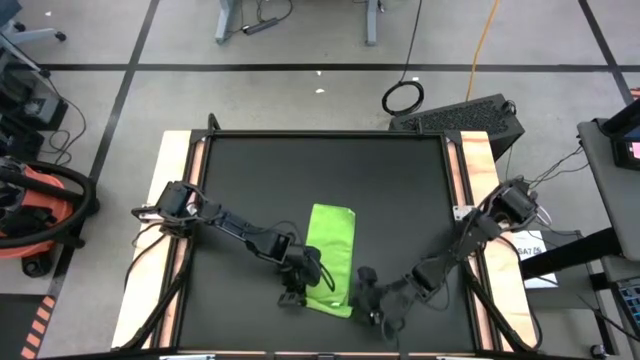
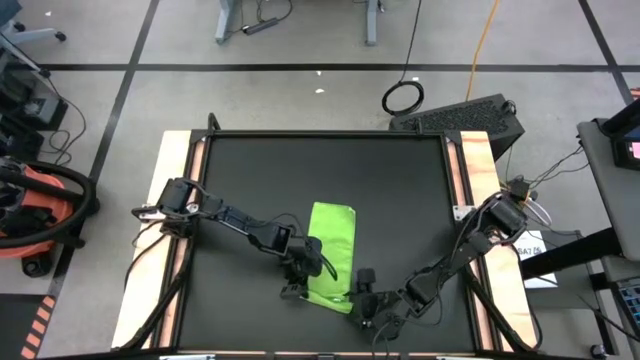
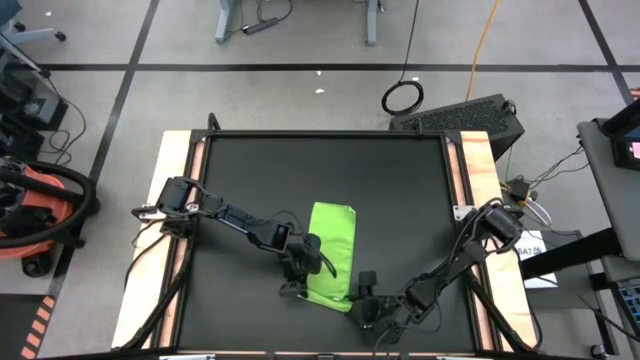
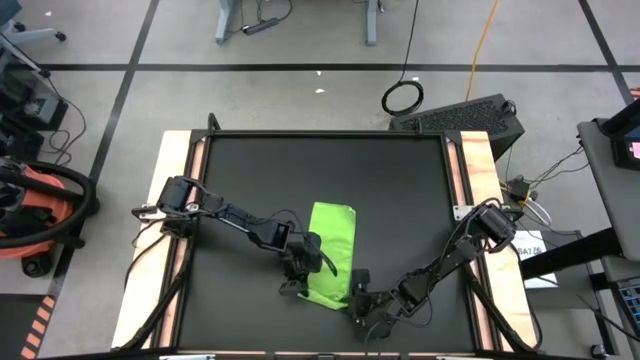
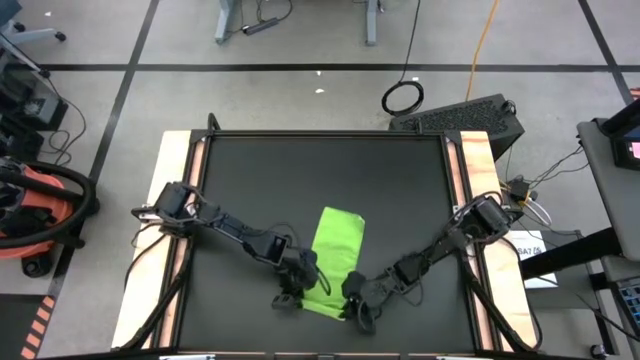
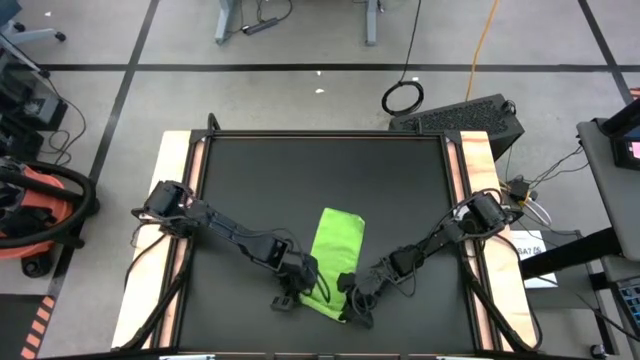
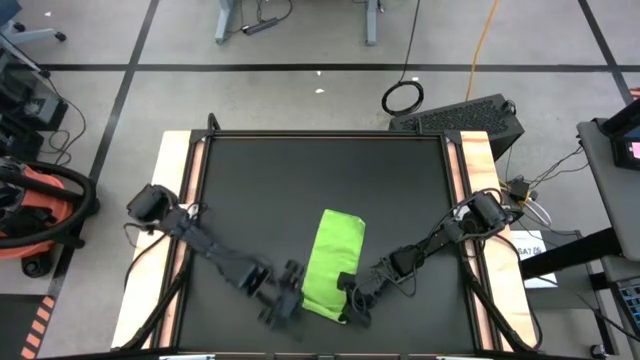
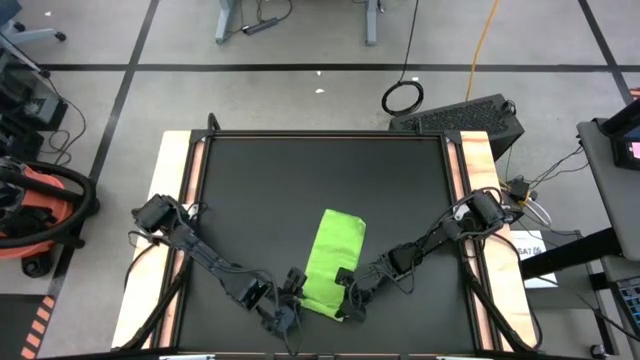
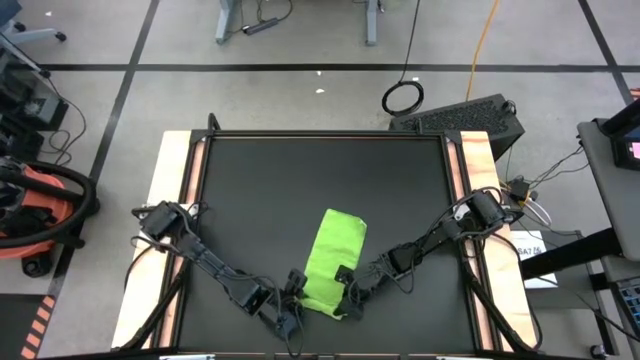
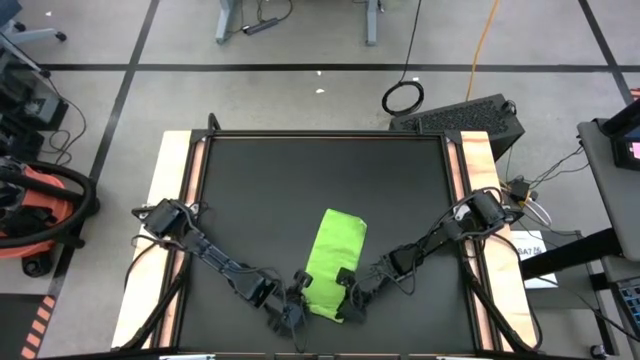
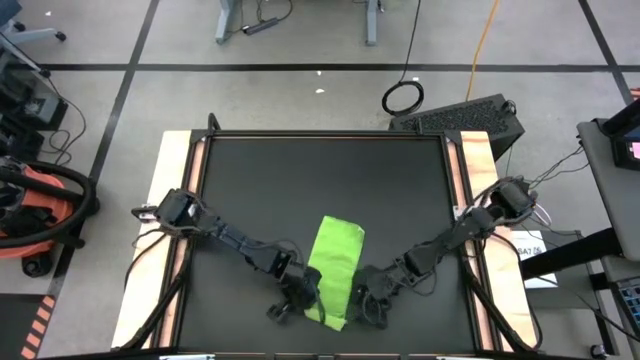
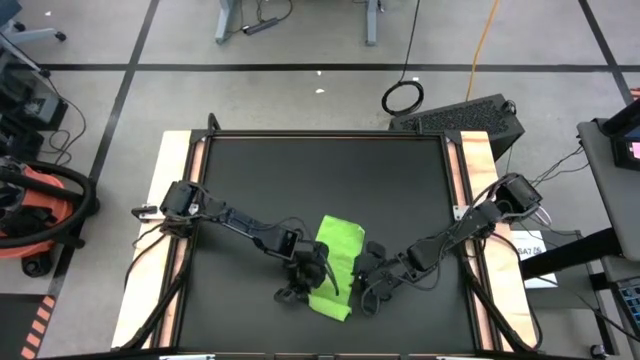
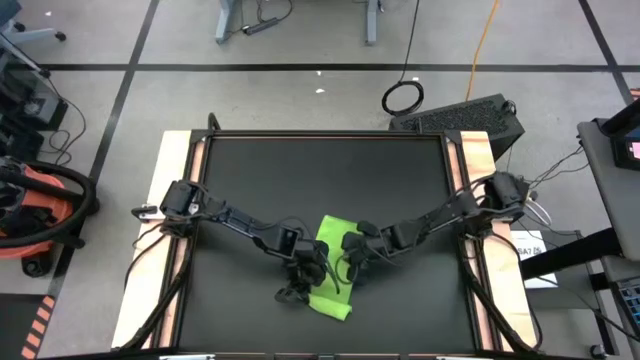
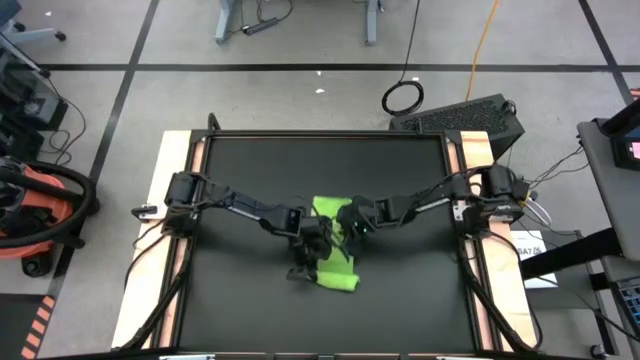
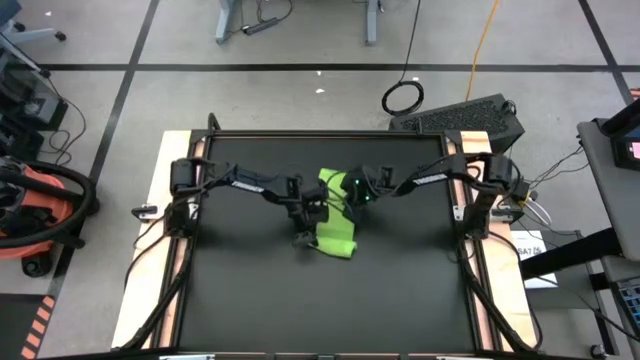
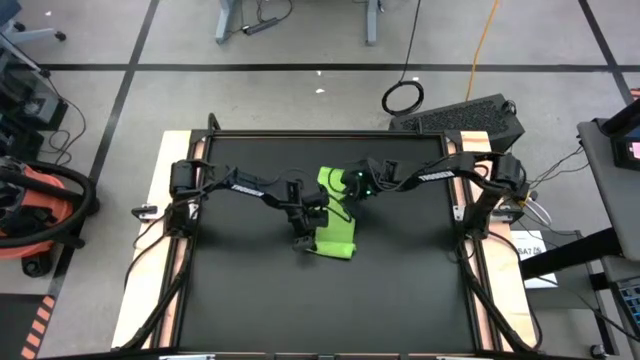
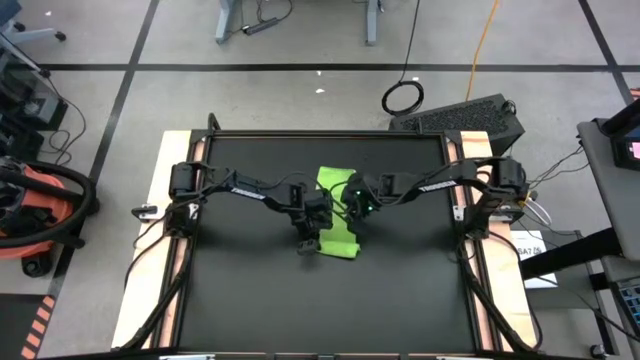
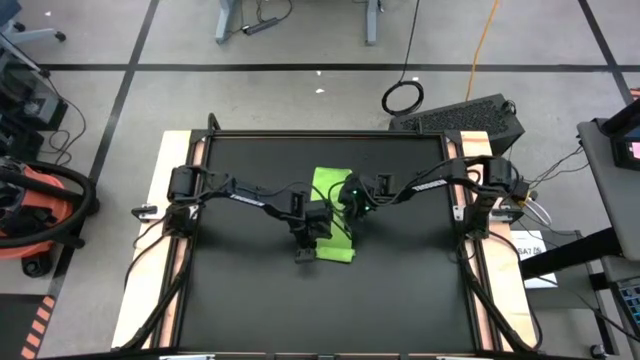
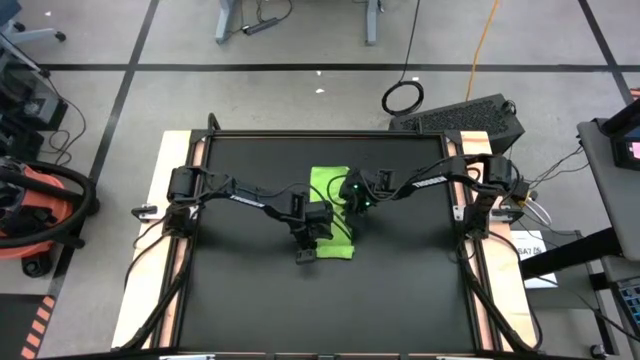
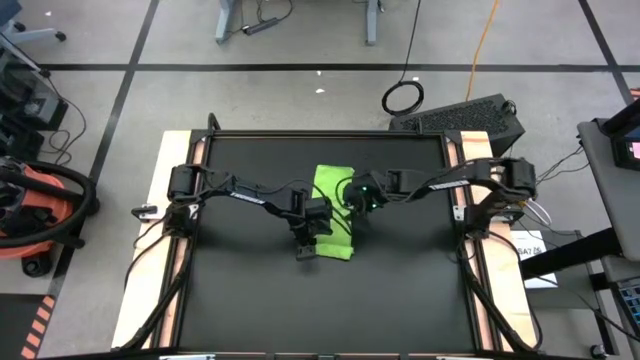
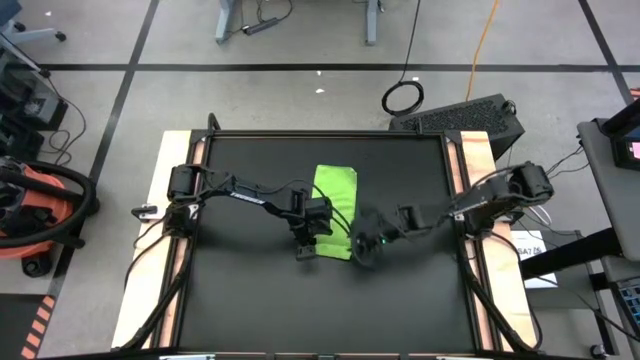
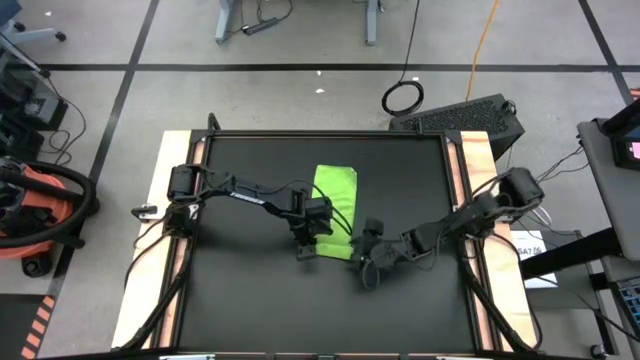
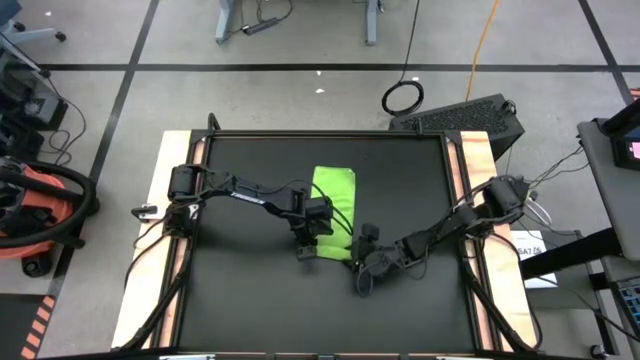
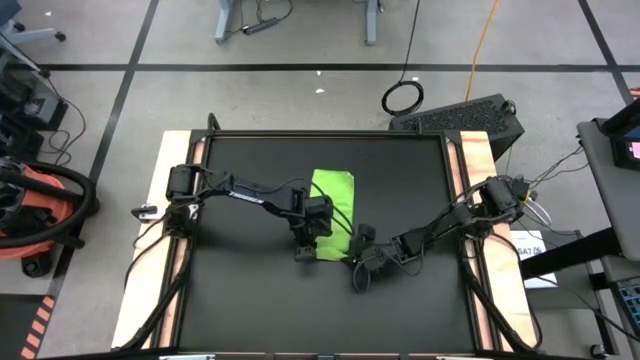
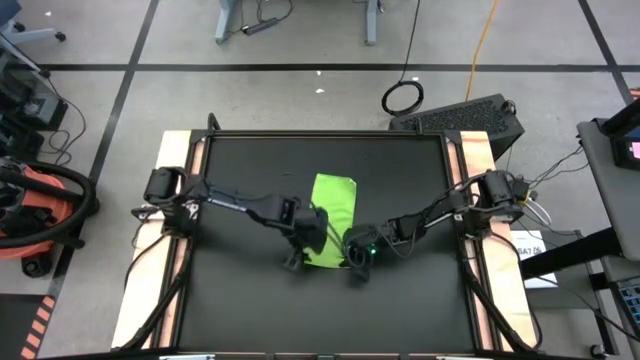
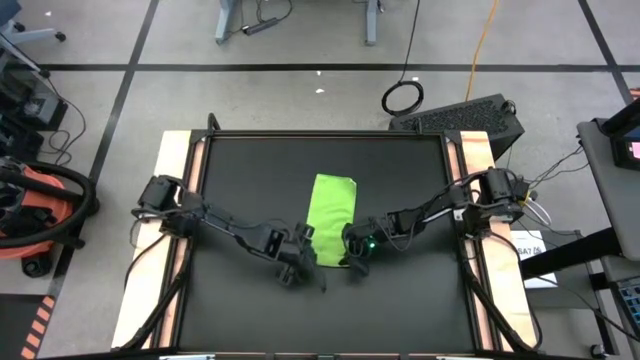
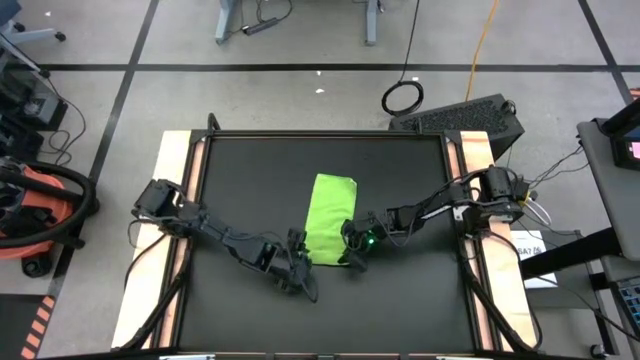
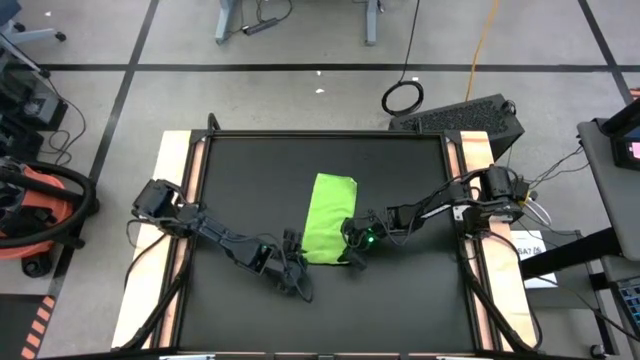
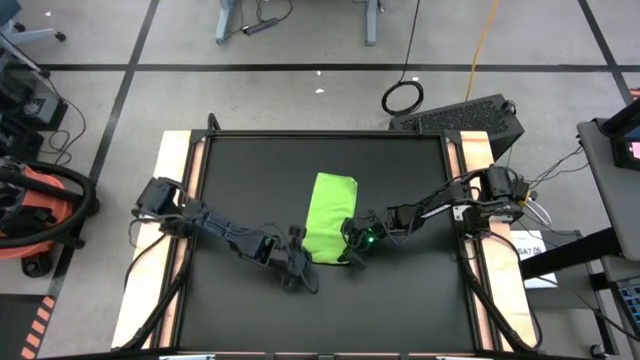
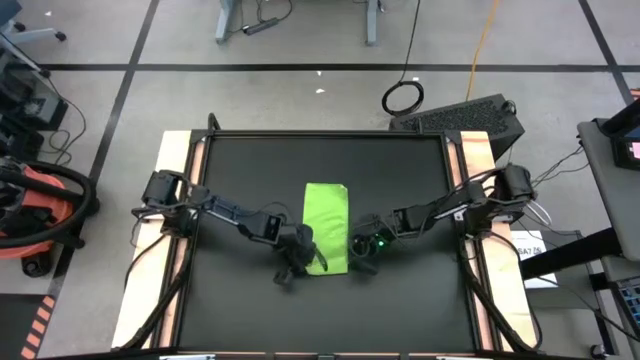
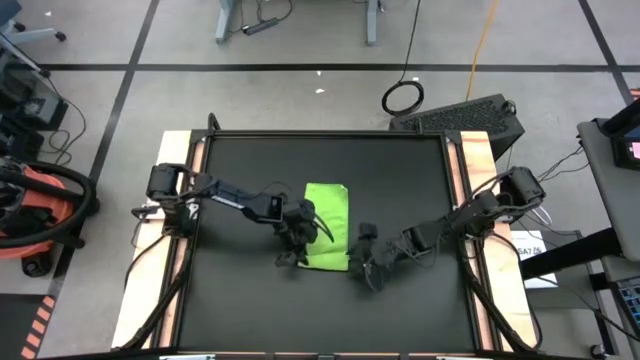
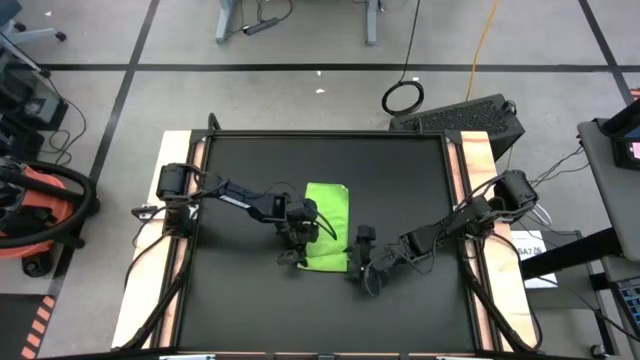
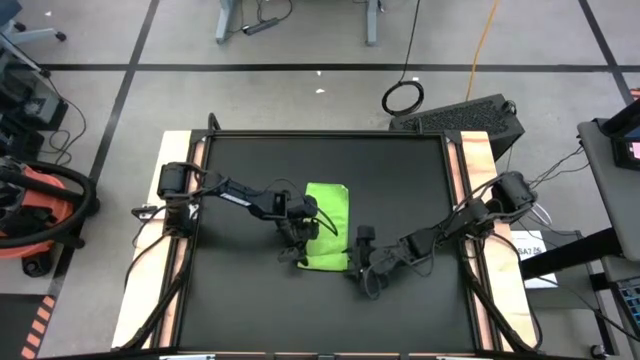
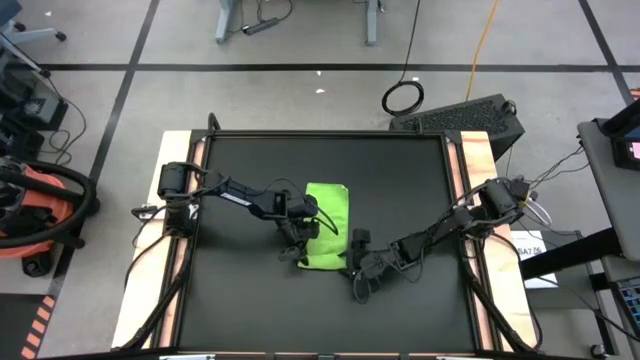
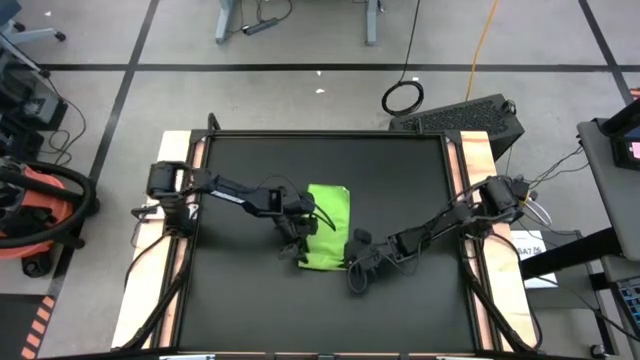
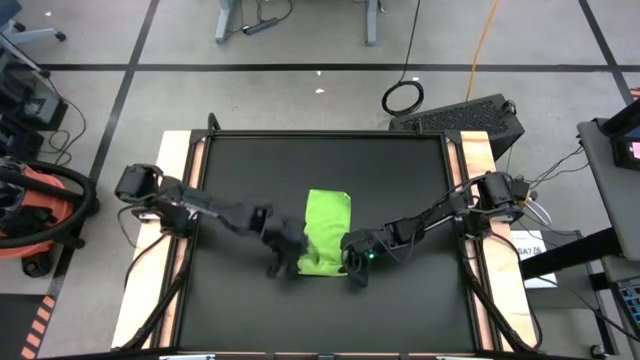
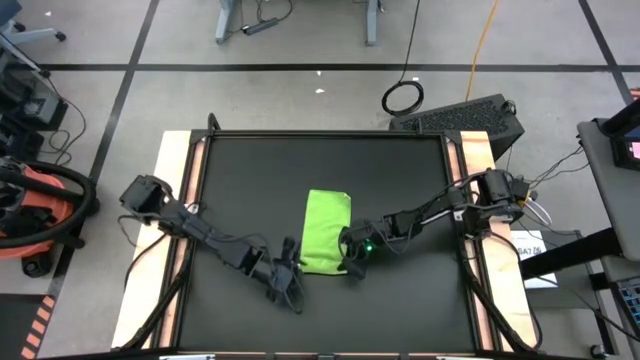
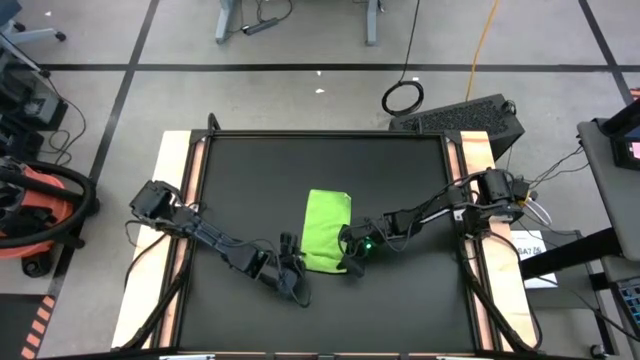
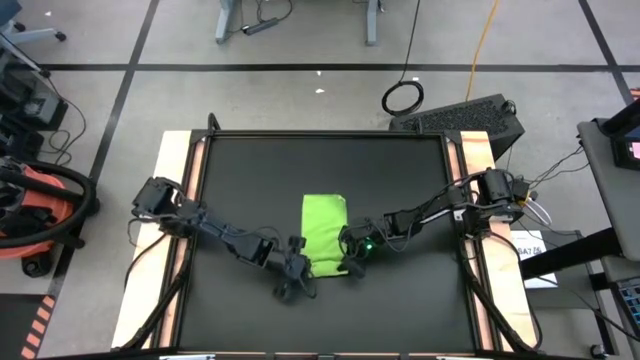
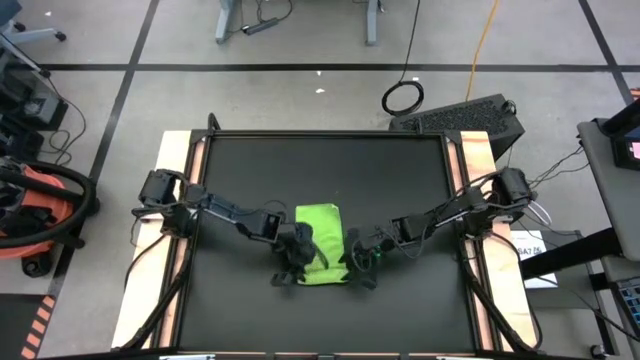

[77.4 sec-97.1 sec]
Task: Roll towel
Roll the green microfiber towel

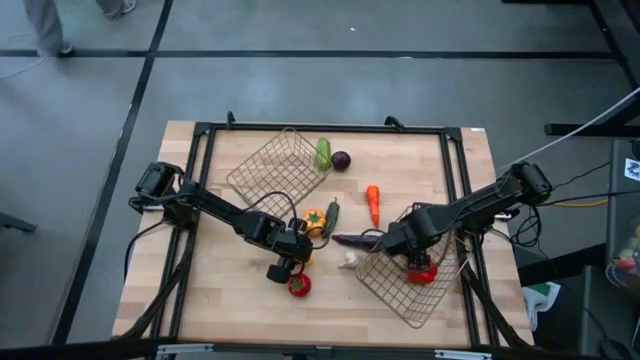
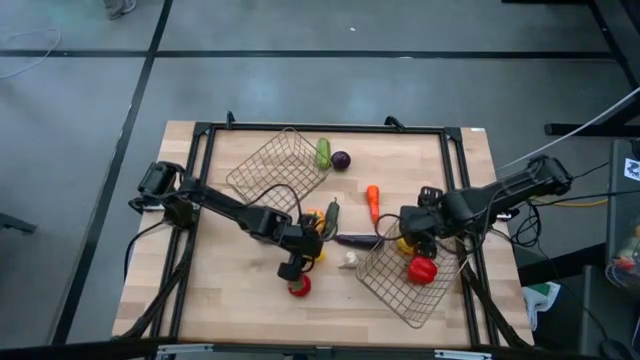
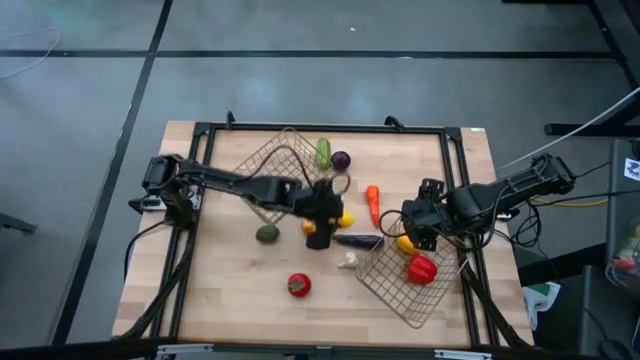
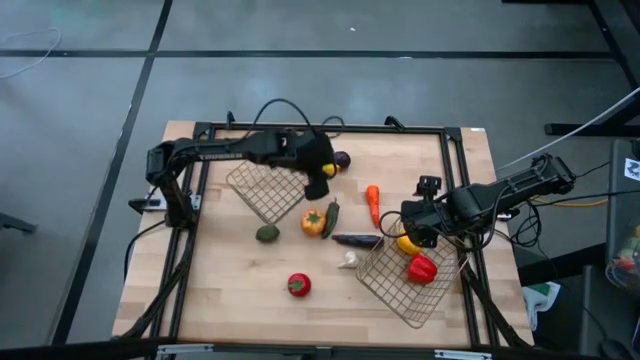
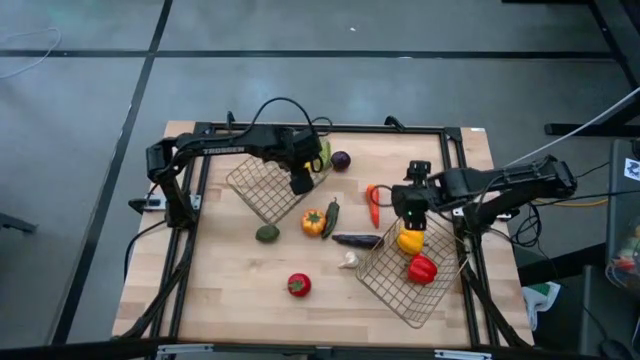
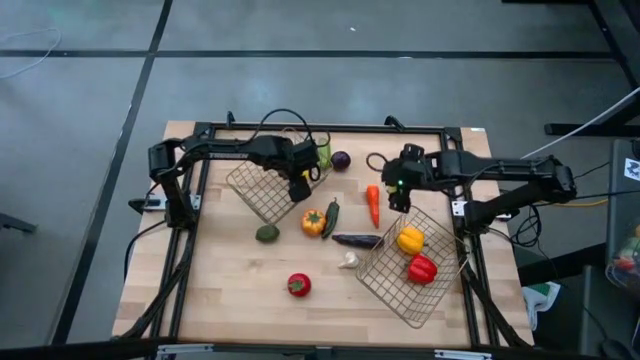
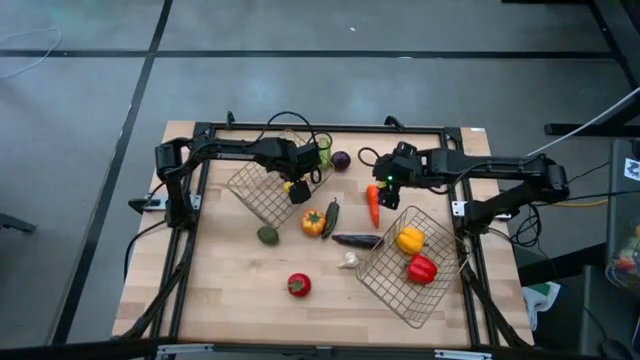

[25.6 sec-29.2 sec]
Task: Sort produce into baskets
Put the yellow lemon into the top basket
